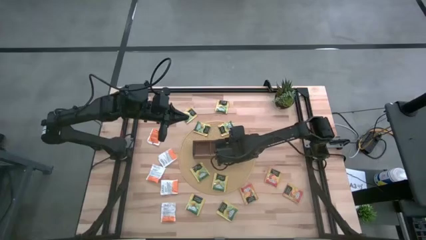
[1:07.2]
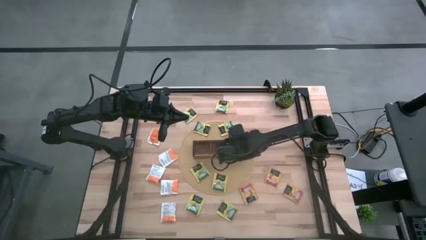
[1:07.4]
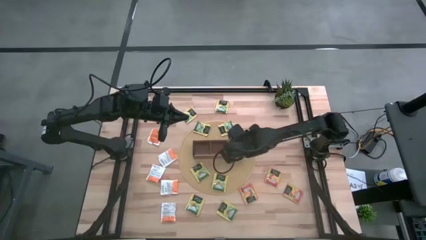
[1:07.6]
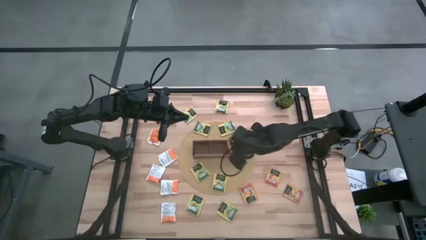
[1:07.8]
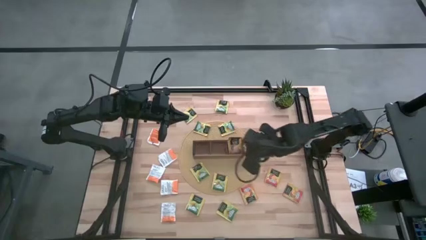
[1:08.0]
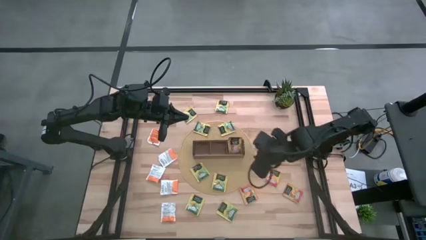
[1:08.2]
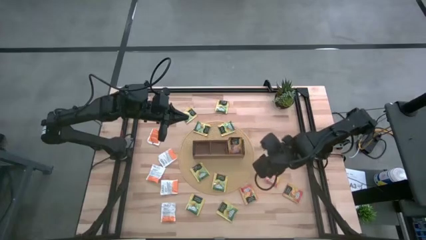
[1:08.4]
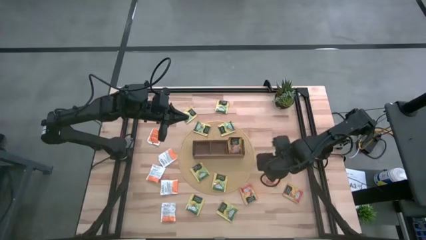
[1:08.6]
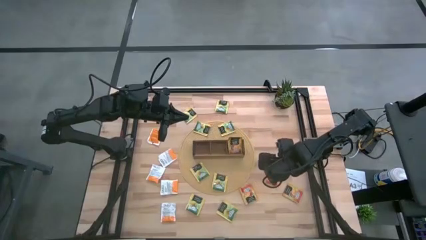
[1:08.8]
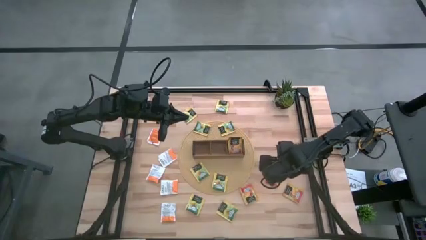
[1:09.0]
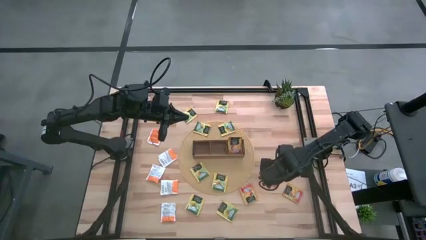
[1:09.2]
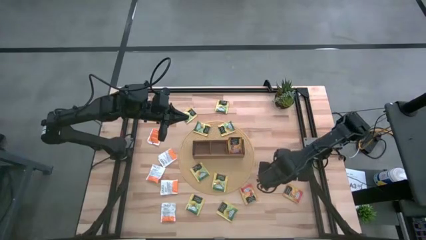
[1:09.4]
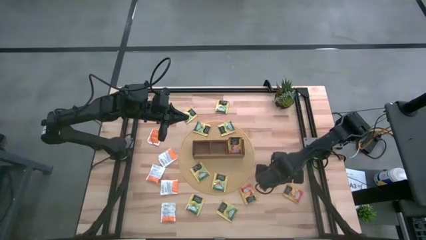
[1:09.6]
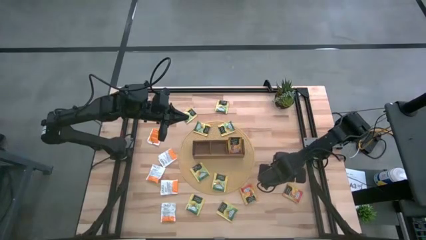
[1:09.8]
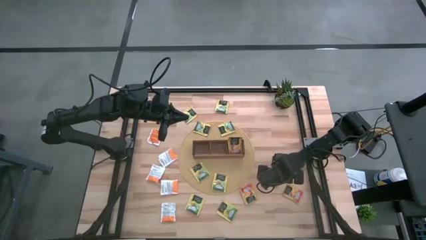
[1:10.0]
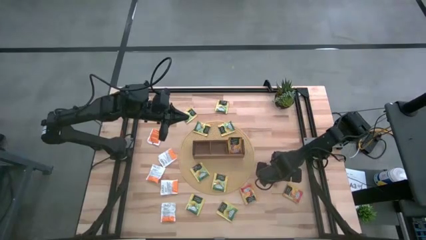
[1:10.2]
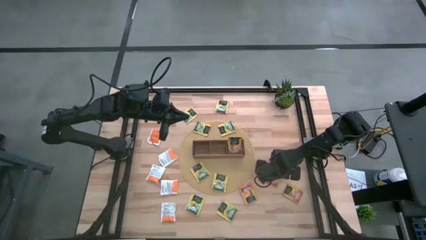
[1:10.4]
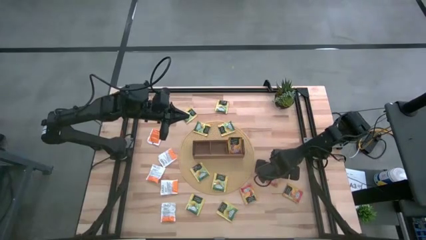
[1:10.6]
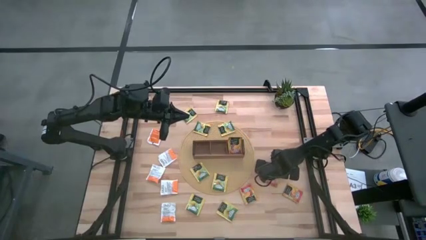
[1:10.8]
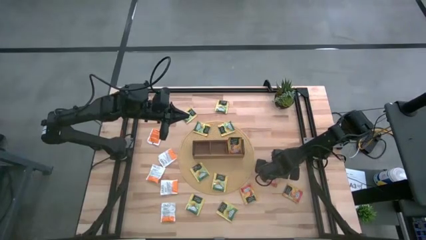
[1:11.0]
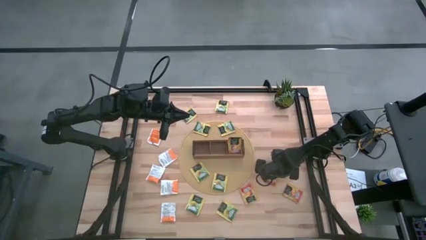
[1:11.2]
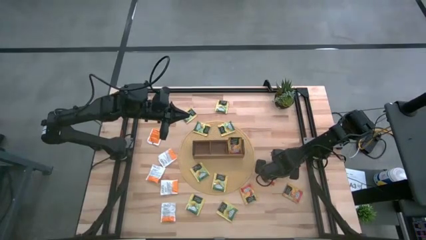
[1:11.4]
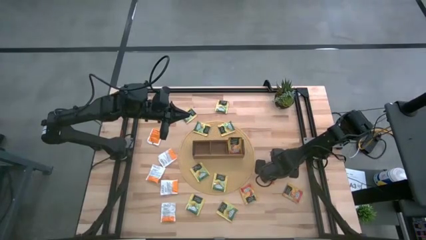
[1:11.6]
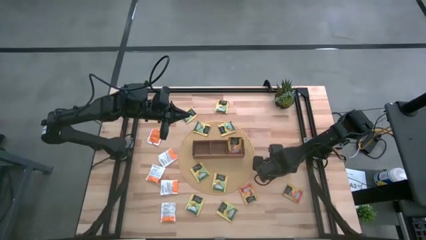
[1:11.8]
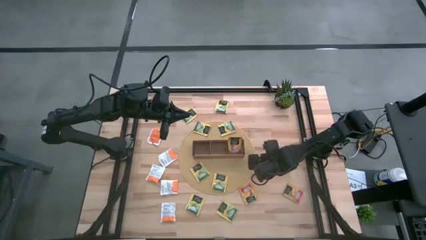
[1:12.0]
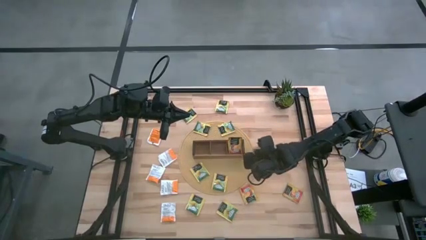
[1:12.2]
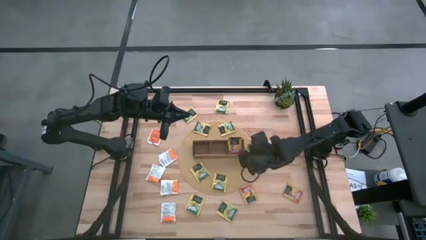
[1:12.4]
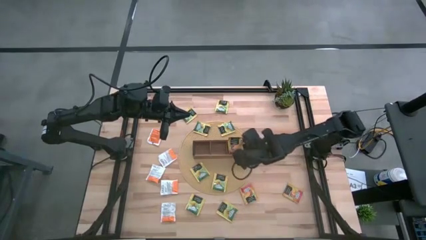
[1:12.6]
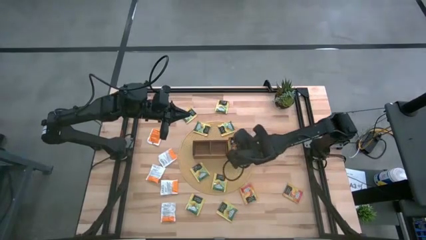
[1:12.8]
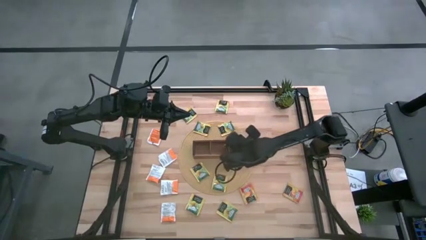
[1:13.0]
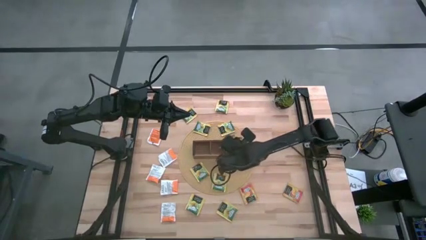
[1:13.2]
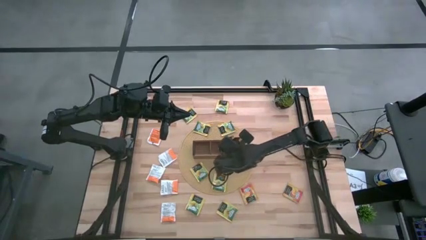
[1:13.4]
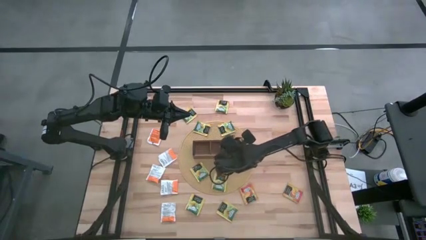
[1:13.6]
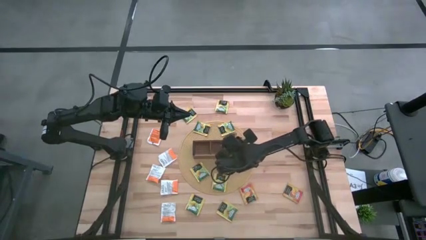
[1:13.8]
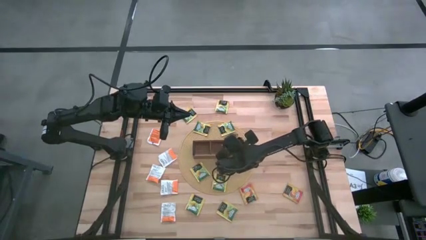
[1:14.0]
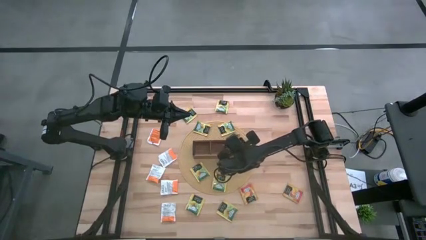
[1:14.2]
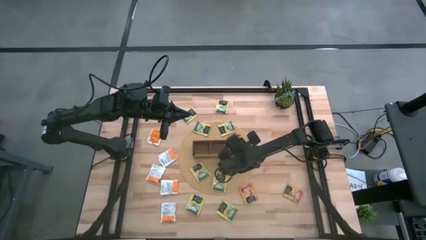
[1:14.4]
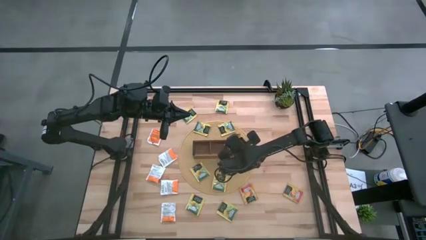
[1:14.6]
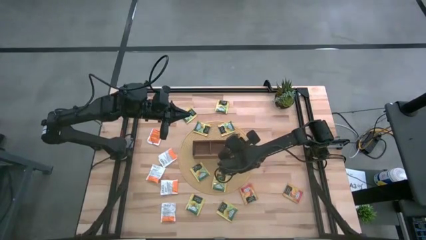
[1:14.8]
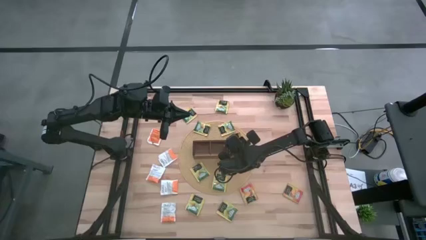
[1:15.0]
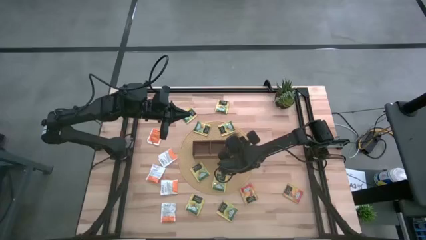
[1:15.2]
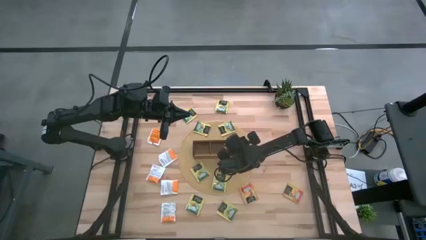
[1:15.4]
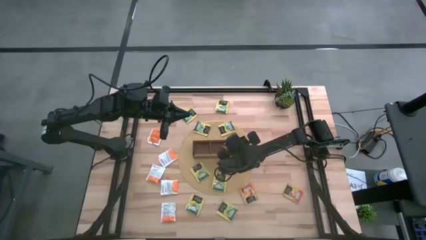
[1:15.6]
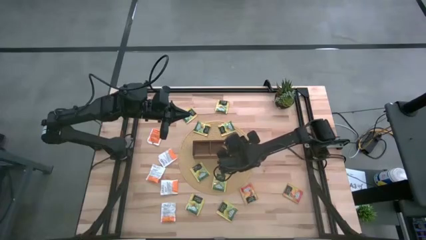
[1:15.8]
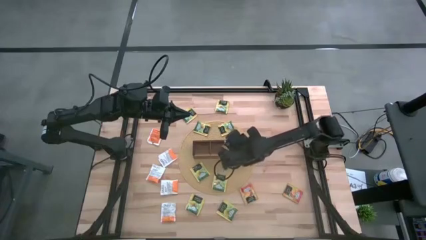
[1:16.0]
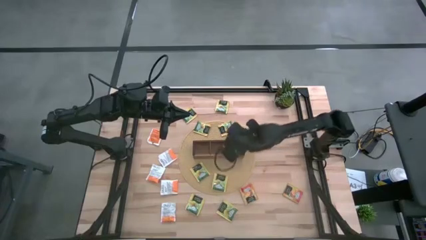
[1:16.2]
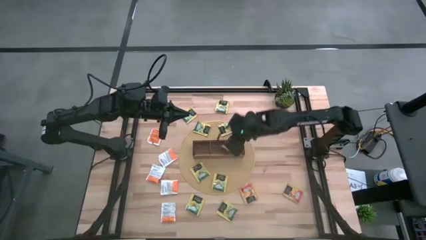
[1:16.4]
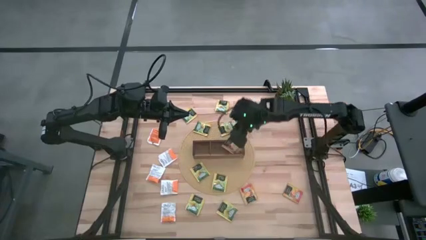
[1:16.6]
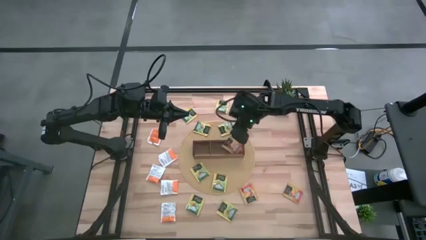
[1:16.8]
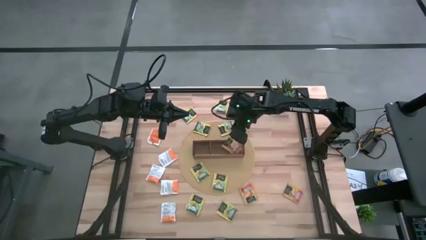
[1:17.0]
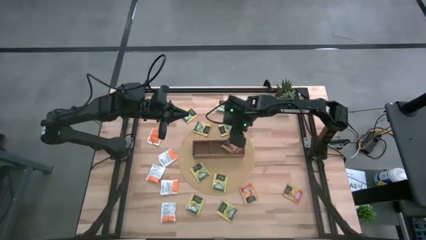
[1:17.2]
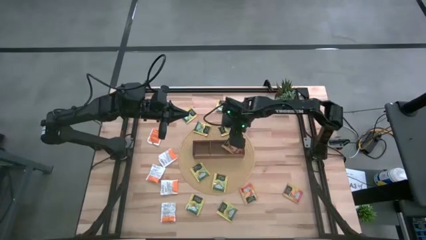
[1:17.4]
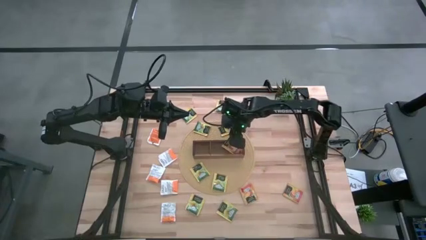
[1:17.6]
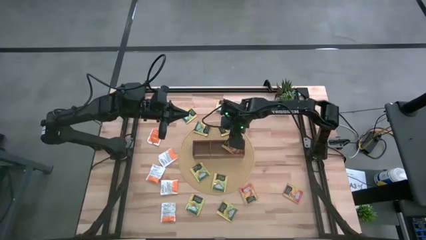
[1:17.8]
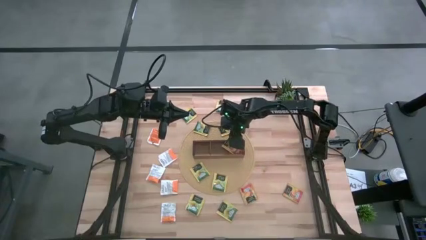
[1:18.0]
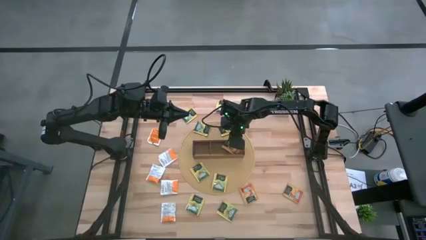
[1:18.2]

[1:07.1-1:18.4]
Task: Pick & Place Tea
Put the orange tea bag into the right section of the wooden organizer

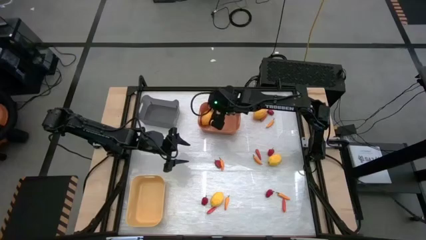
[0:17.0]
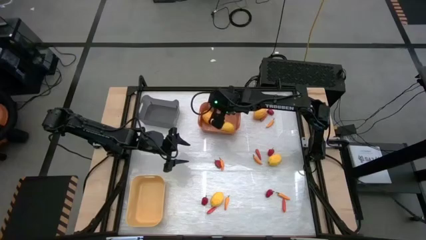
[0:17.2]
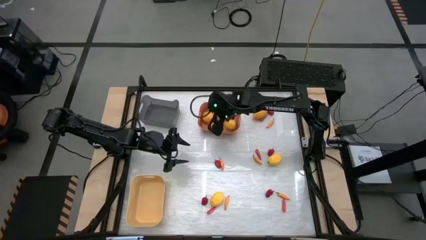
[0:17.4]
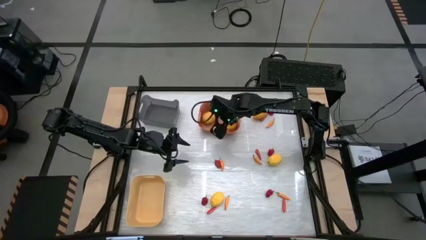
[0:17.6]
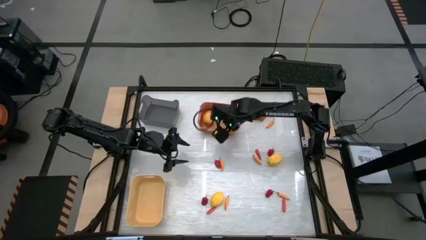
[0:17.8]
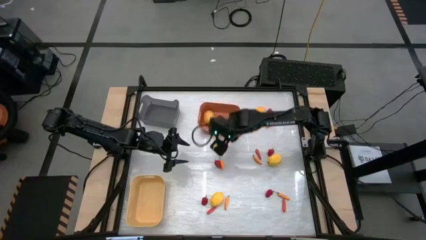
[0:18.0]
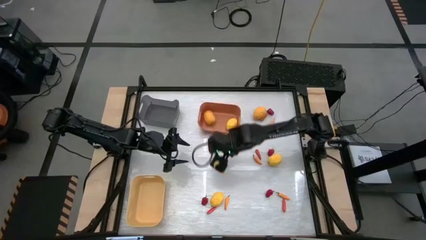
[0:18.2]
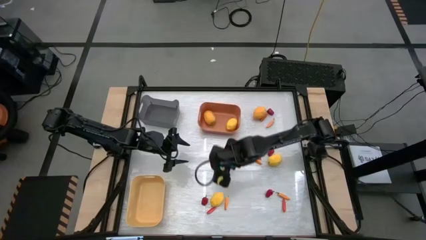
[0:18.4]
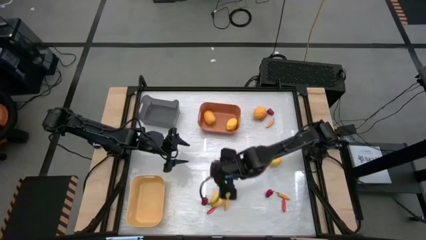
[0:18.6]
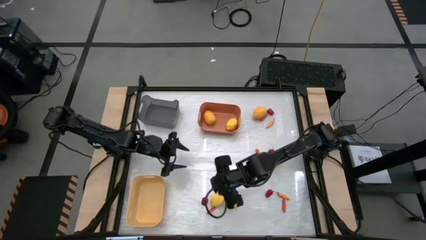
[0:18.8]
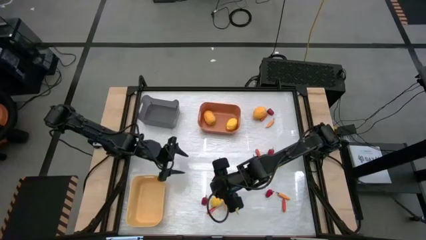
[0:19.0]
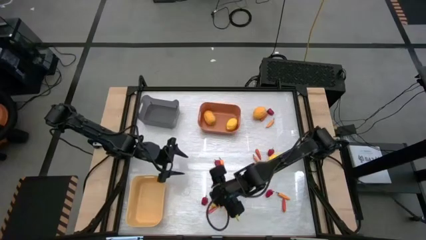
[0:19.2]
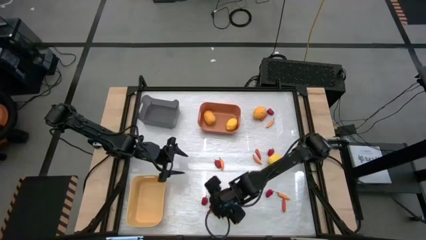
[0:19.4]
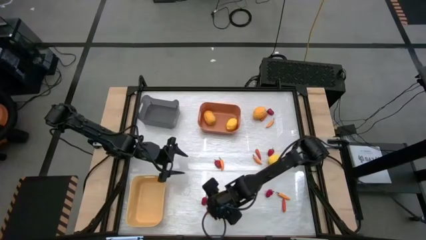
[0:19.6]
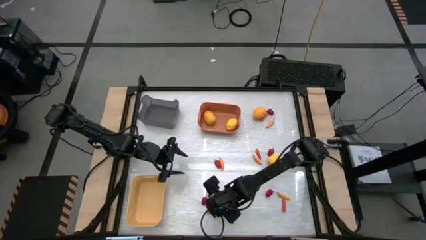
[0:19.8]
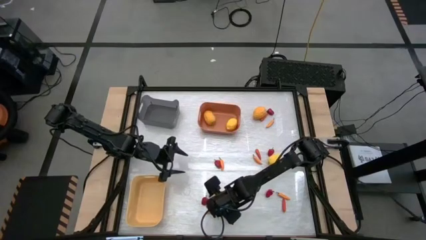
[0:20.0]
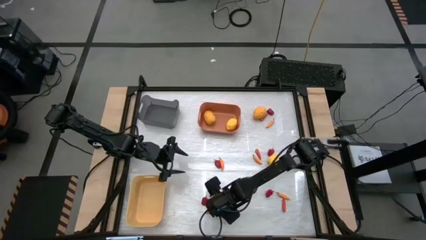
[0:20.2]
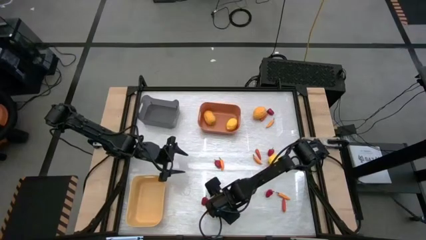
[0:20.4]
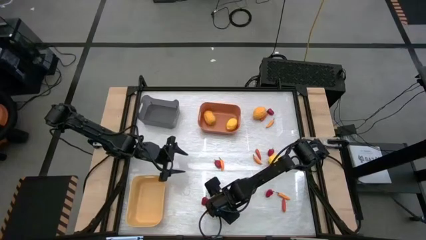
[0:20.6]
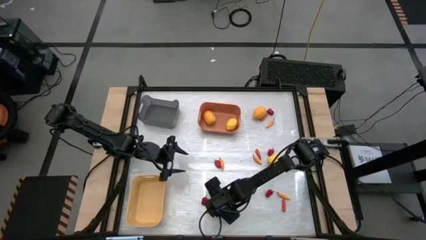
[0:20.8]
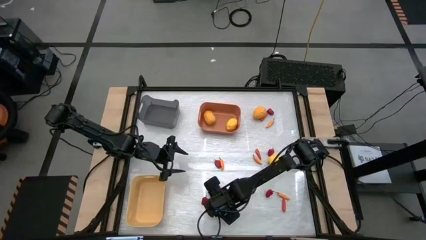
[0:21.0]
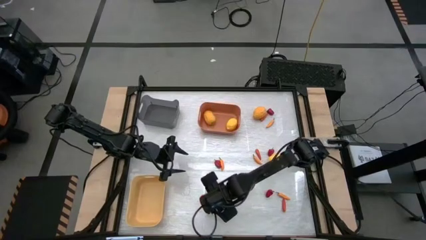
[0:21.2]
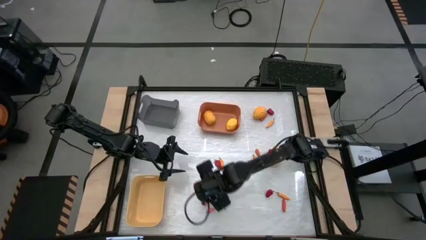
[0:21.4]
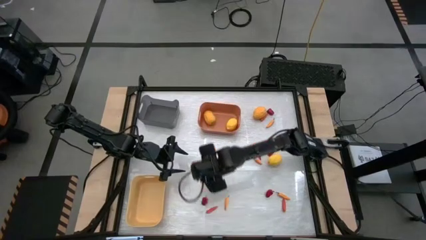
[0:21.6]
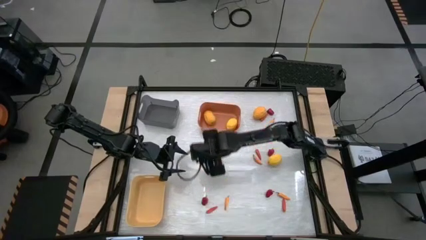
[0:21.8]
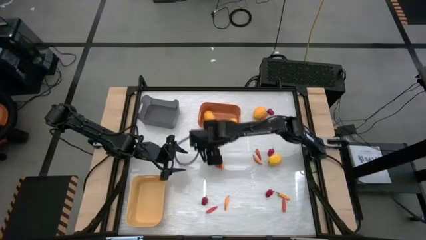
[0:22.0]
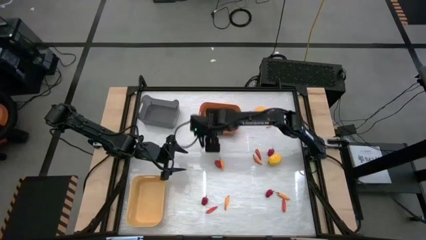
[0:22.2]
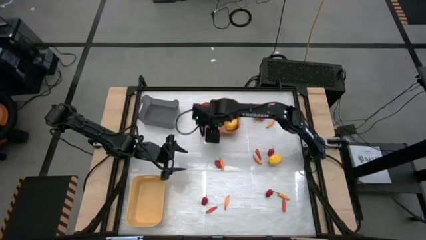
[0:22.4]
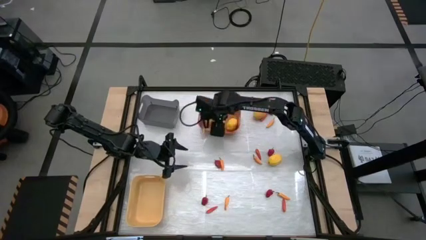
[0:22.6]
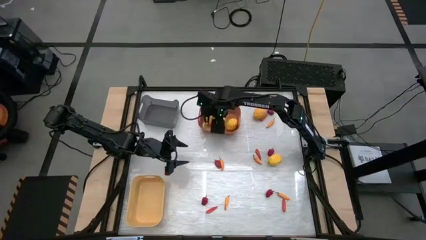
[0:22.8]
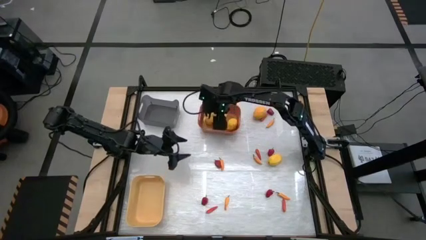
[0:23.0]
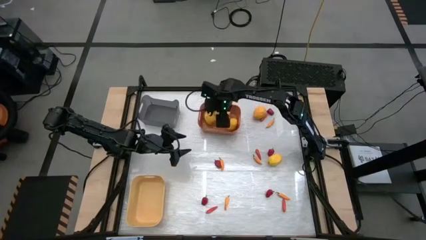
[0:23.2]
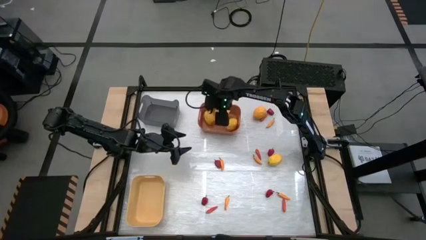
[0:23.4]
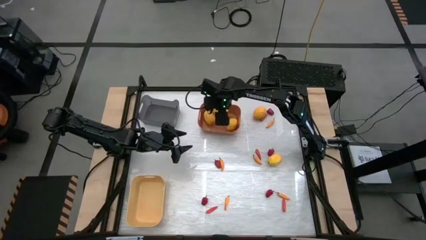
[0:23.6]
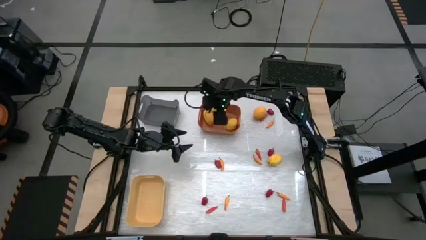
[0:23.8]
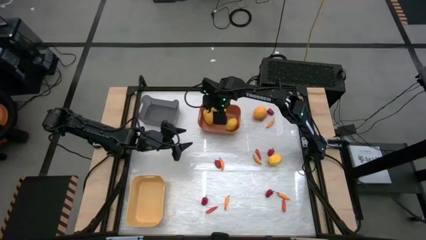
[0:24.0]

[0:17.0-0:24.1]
Task: Sort produce into baskets
Put the lemon into the orange bin
